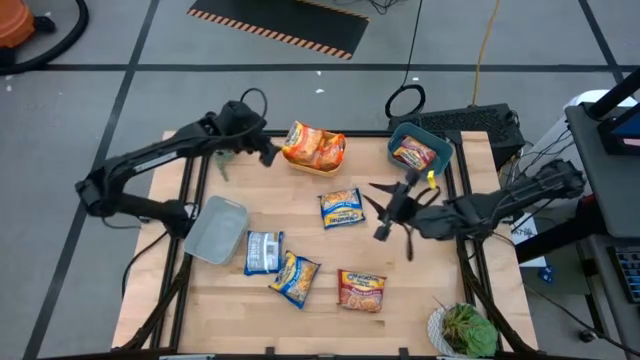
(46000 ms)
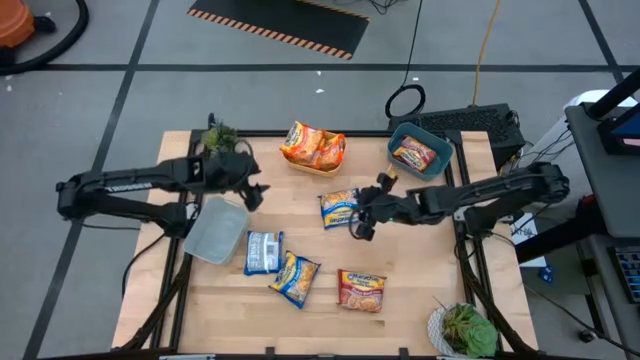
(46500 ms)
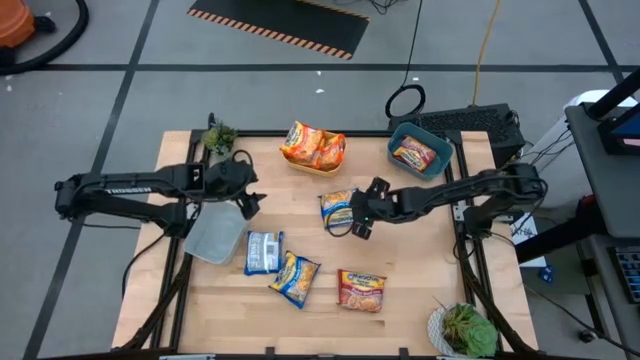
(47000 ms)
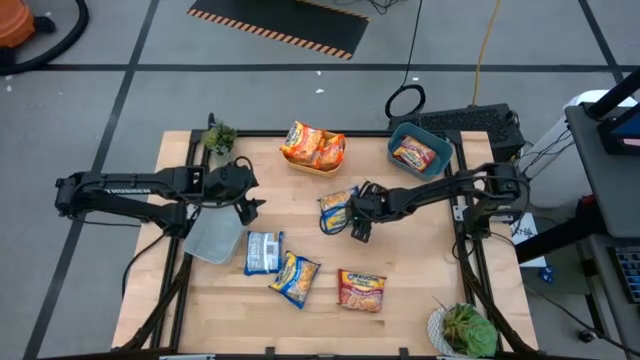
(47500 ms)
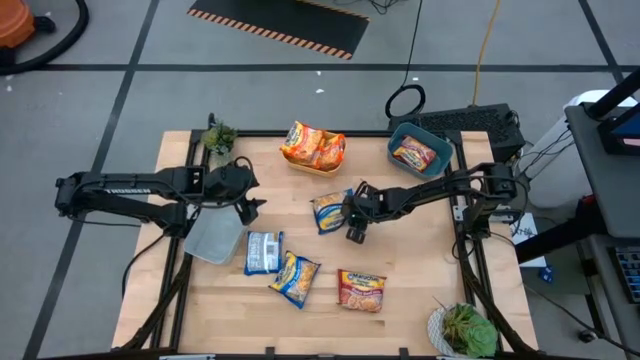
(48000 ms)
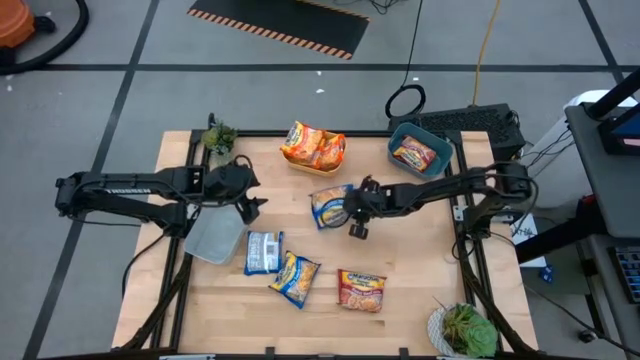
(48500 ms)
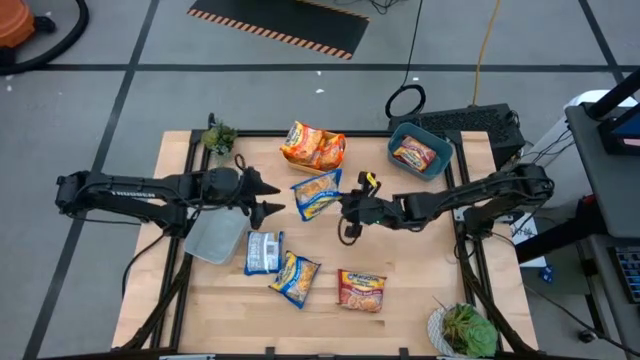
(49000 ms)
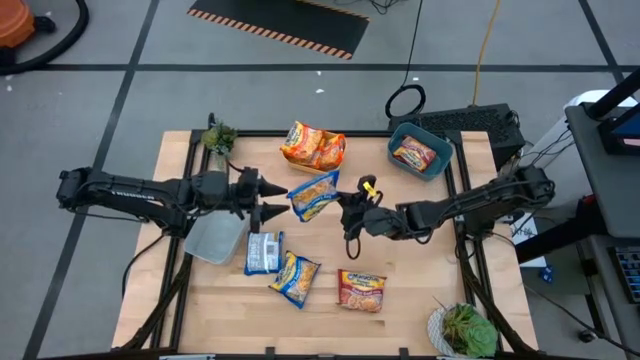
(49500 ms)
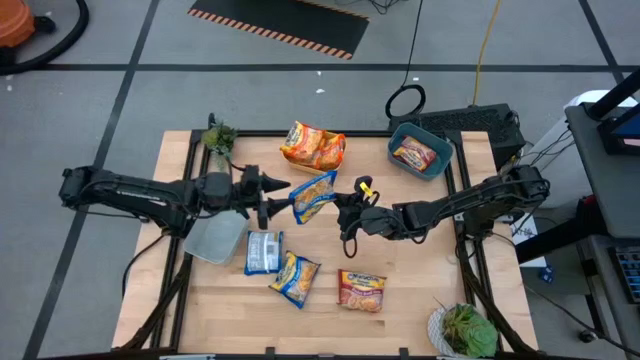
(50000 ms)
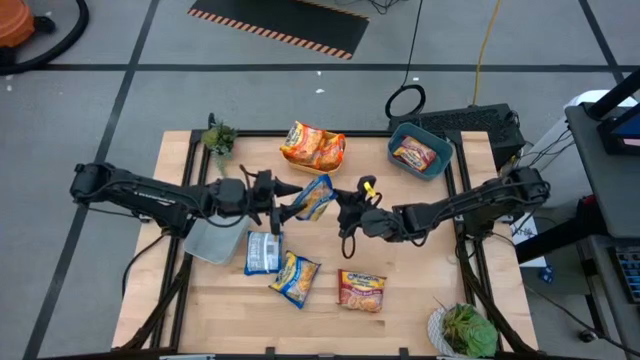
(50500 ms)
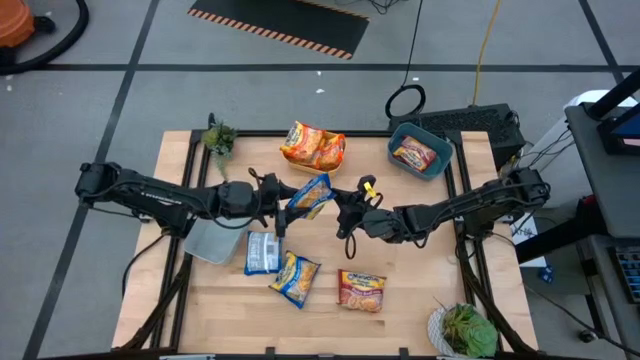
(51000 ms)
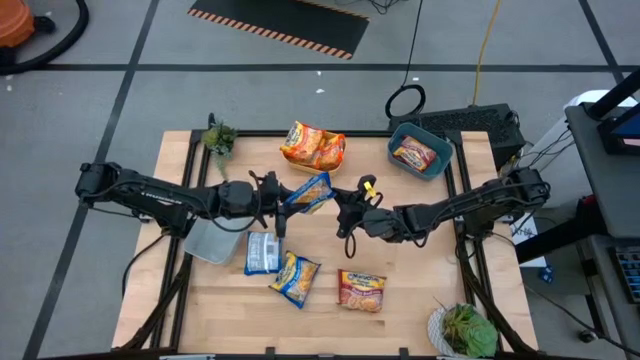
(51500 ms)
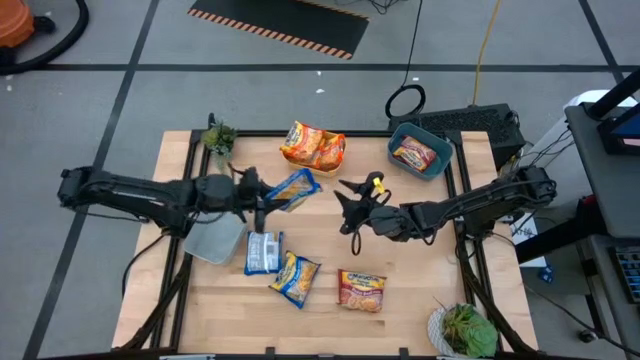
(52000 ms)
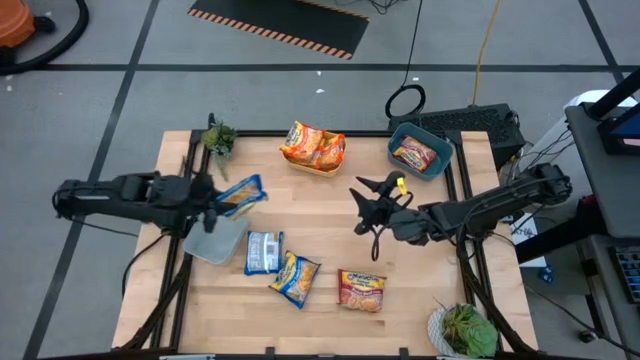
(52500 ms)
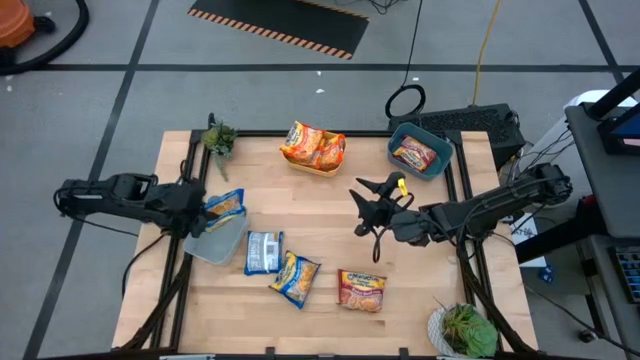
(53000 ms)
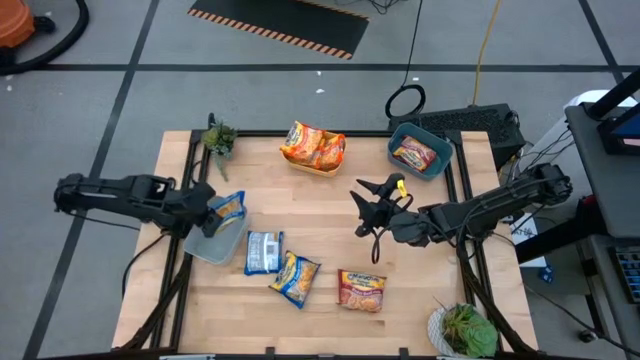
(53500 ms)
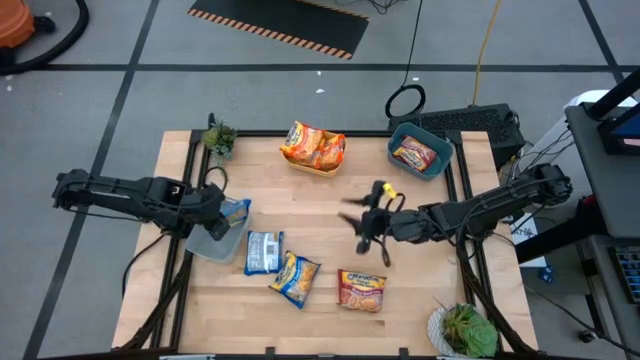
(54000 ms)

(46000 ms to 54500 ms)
Task: Sort Maruchan noodles
Put the top right blue bag into the gray bin

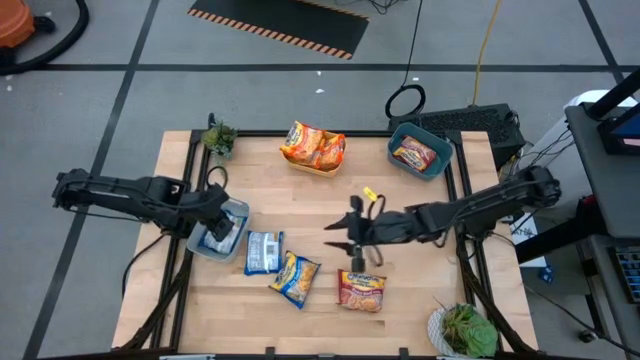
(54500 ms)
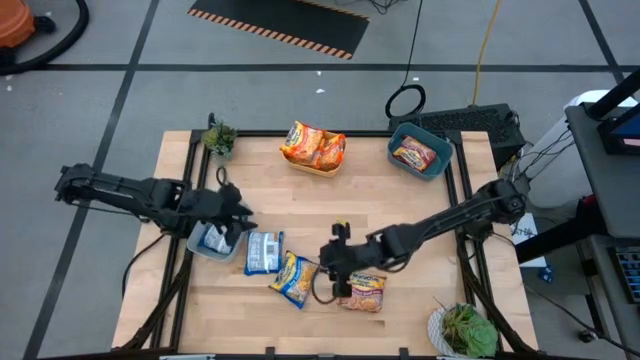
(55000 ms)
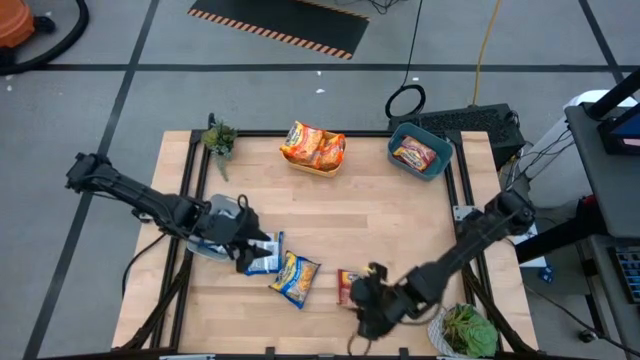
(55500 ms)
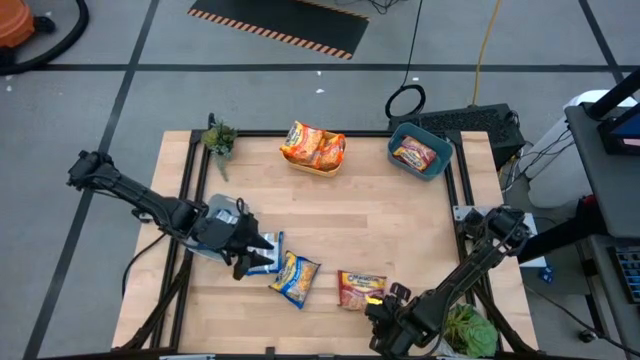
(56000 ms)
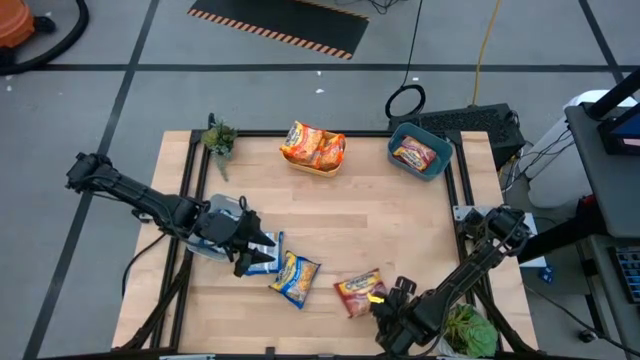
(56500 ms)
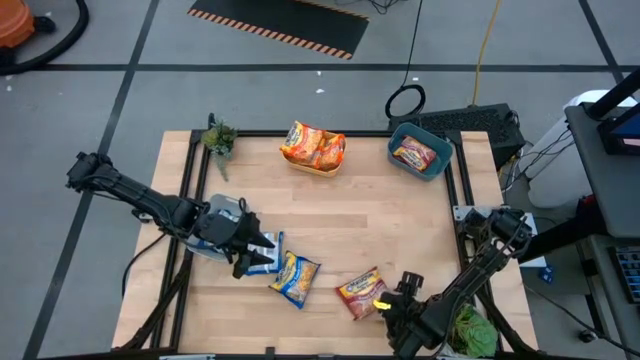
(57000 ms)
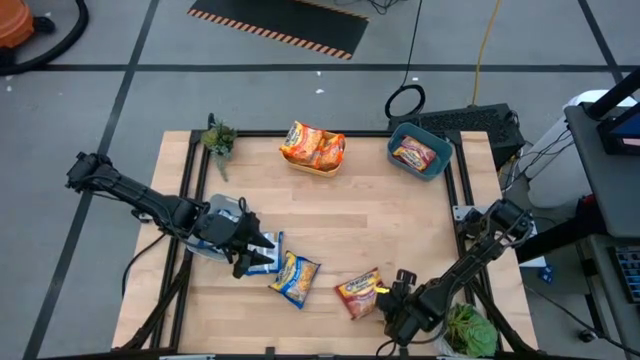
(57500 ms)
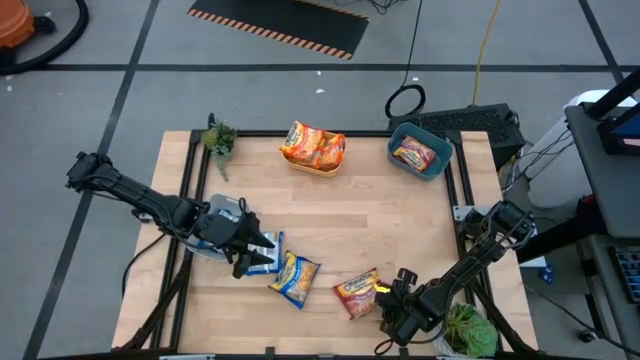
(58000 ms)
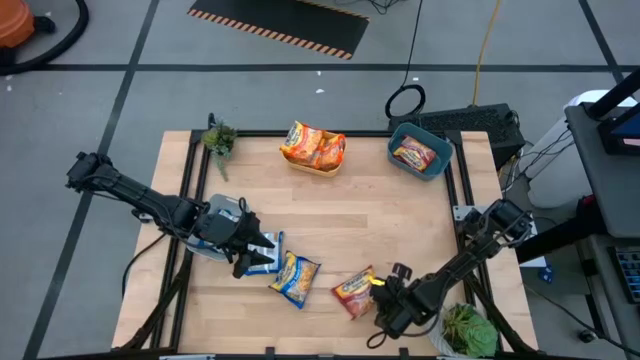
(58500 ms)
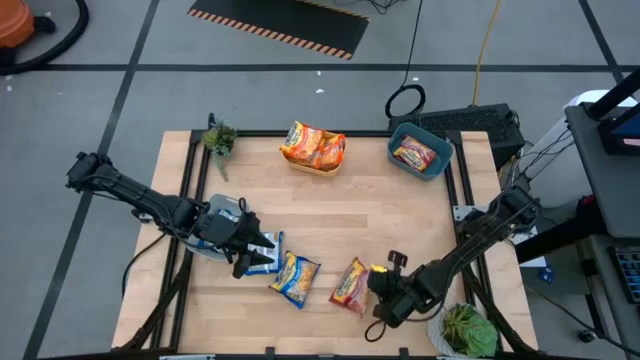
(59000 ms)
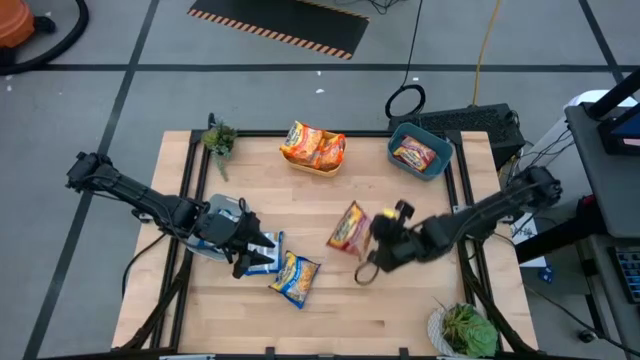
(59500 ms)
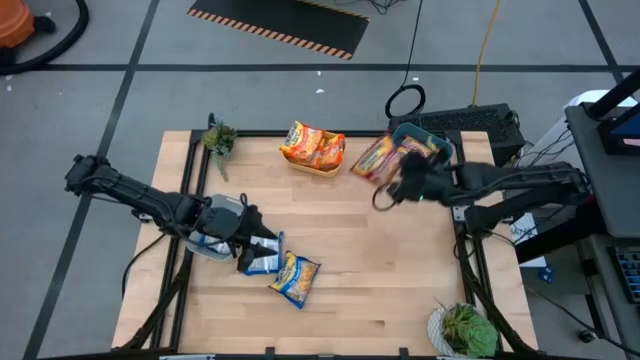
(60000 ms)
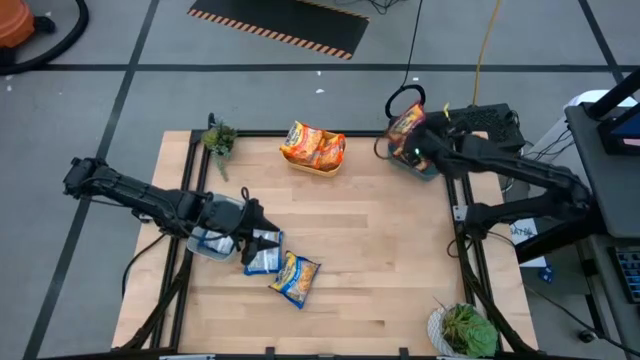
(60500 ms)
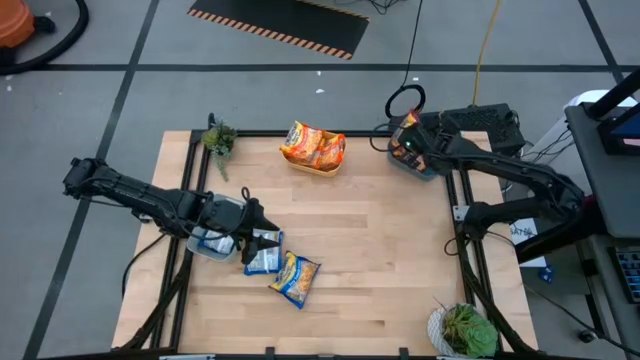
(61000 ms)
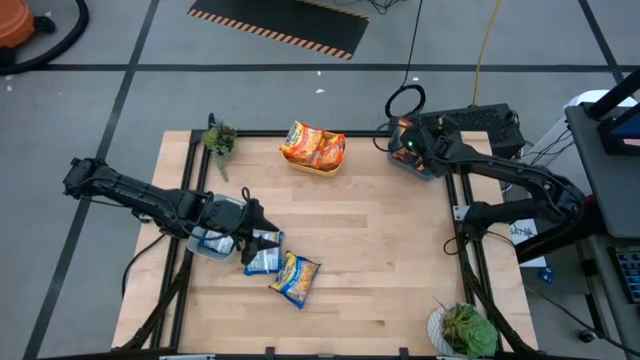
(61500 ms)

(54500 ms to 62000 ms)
Put the red bag into the blue bin

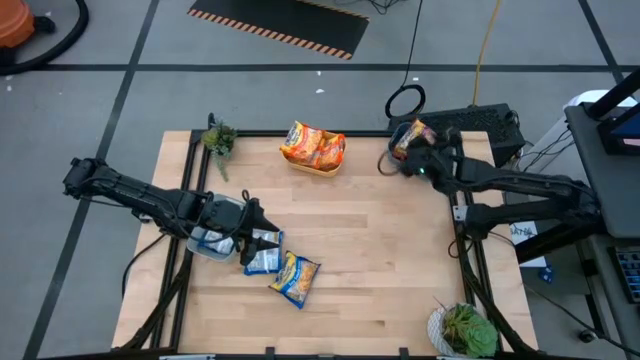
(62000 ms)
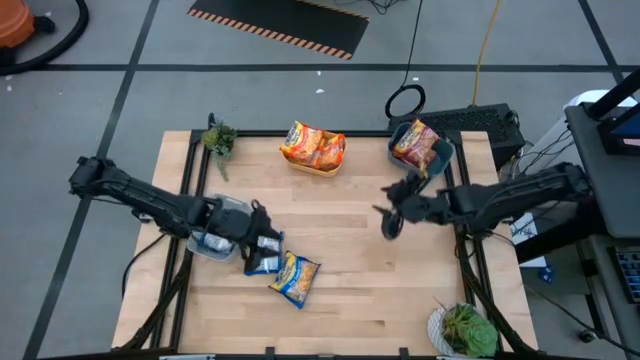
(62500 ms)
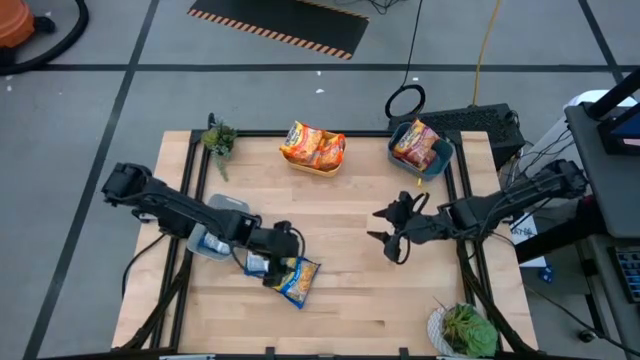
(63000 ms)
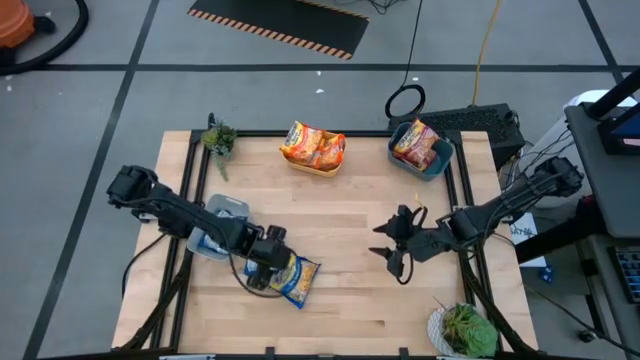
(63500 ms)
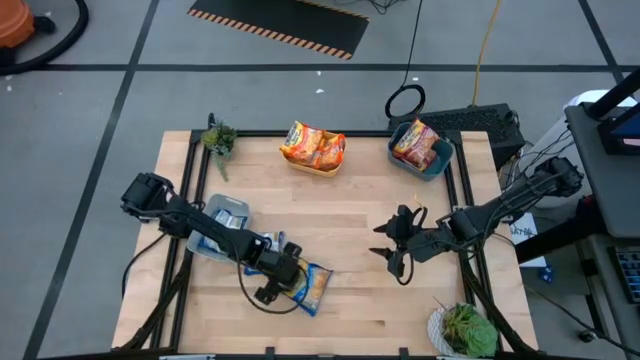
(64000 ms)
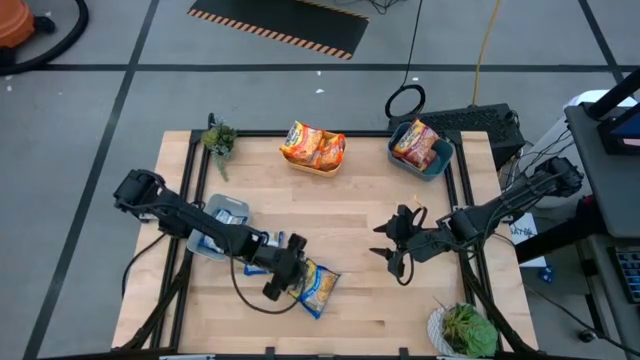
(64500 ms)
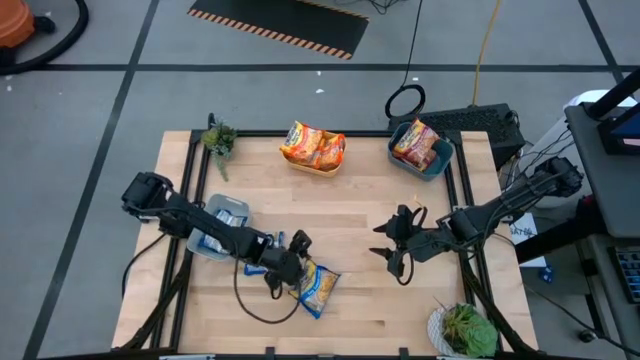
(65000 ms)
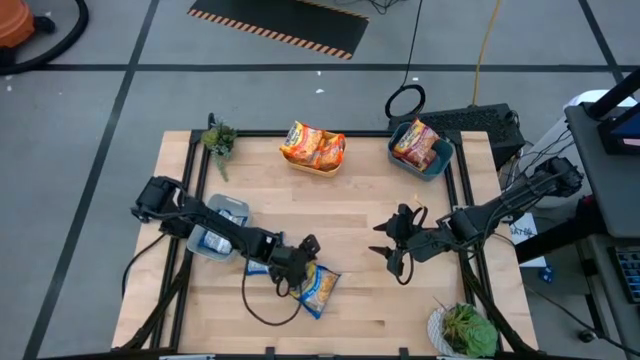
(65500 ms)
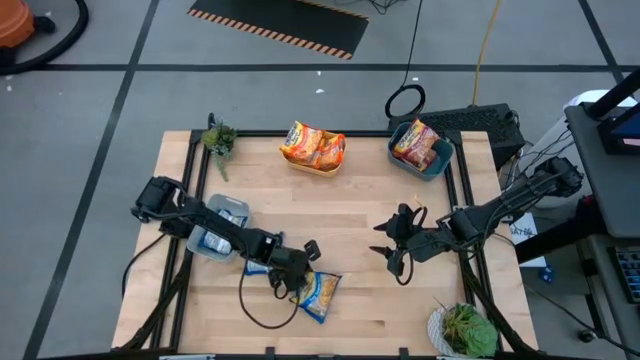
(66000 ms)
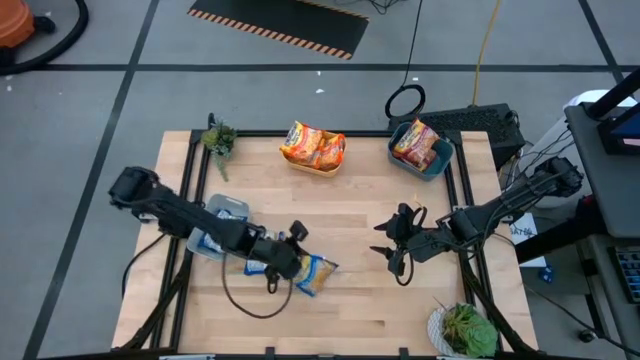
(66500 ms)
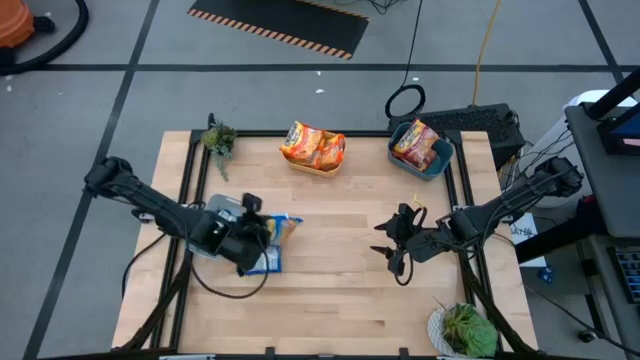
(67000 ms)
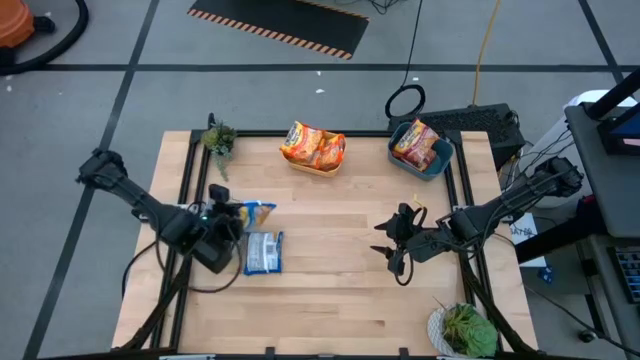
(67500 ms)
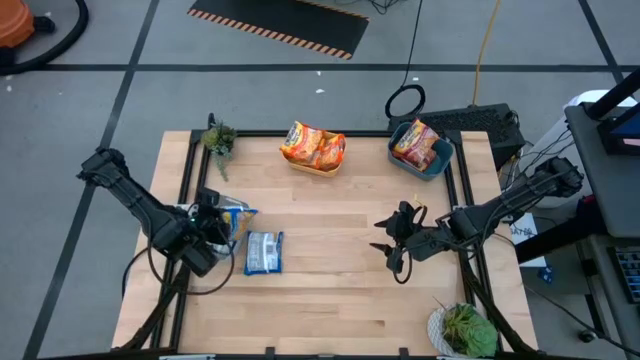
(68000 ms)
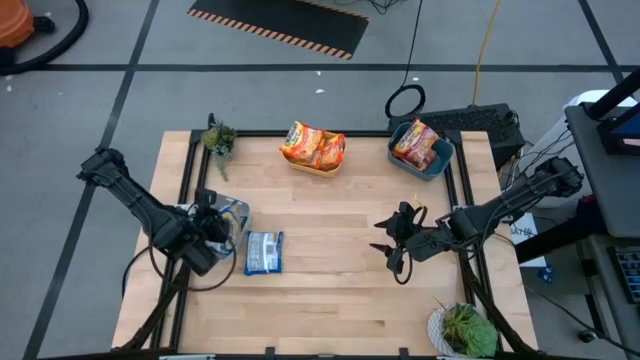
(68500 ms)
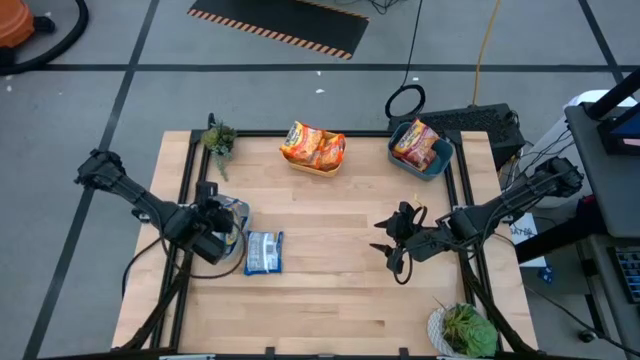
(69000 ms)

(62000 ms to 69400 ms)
Put the right blue bag into the gray bin
